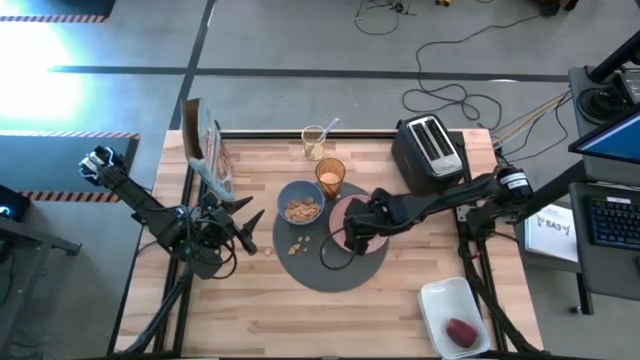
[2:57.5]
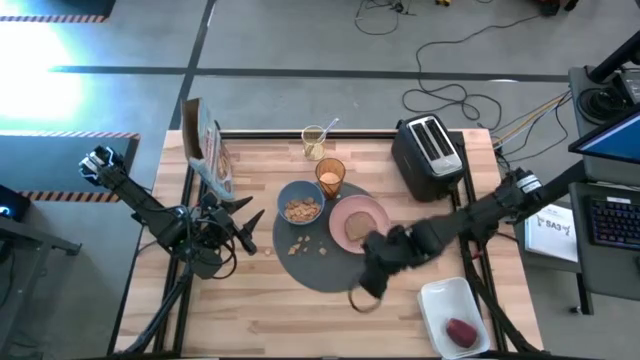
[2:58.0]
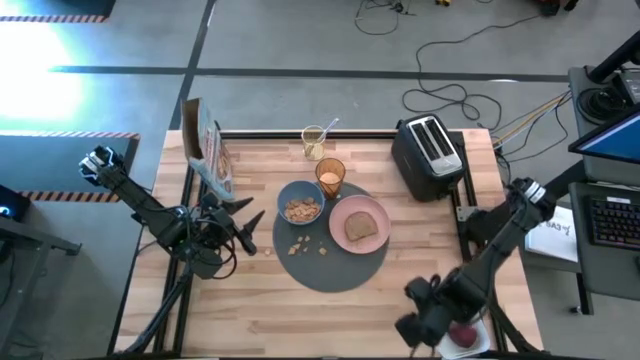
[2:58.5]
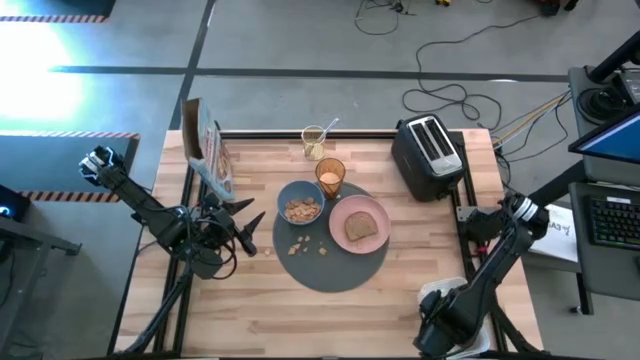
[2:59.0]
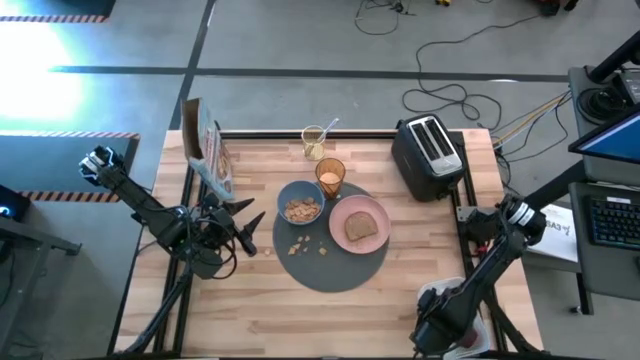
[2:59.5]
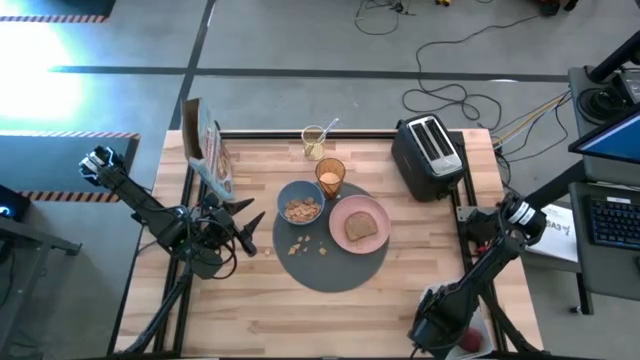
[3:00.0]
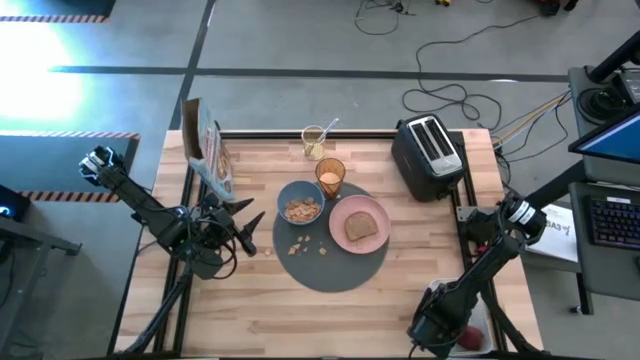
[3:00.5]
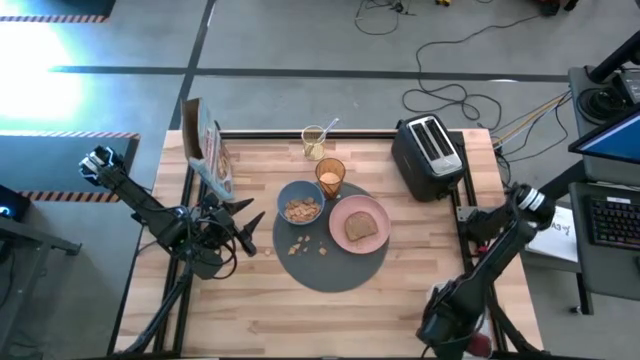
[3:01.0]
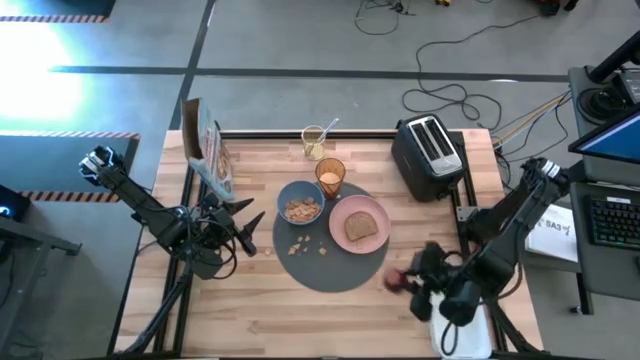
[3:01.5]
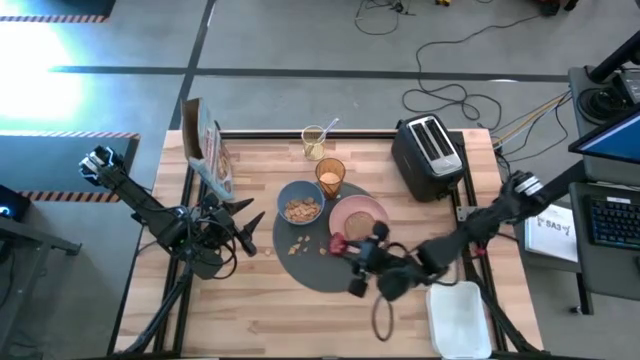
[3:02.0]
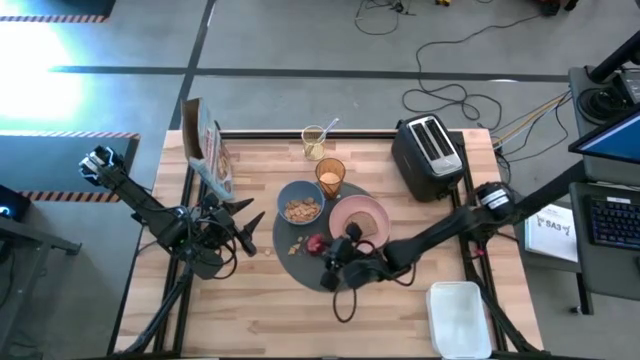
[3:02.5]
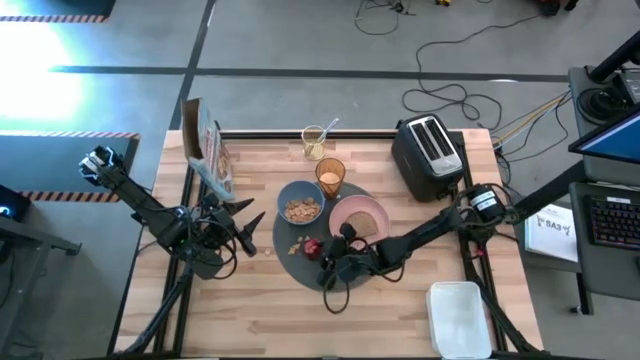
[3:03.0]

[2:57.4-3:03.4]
Task: Arrange a breakfast setting
Put the red apple to the bottom of the blue bowl and plate on the grey table placemat

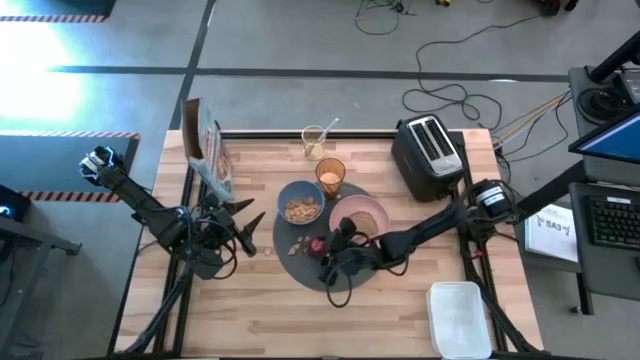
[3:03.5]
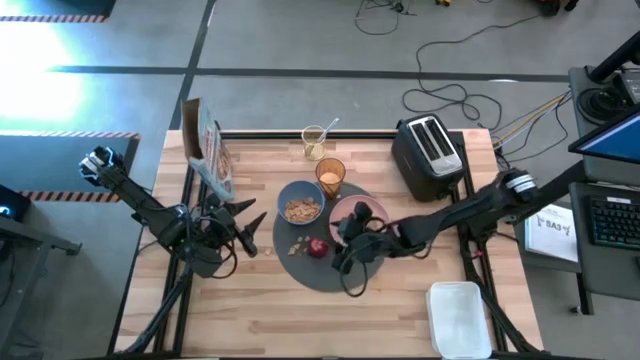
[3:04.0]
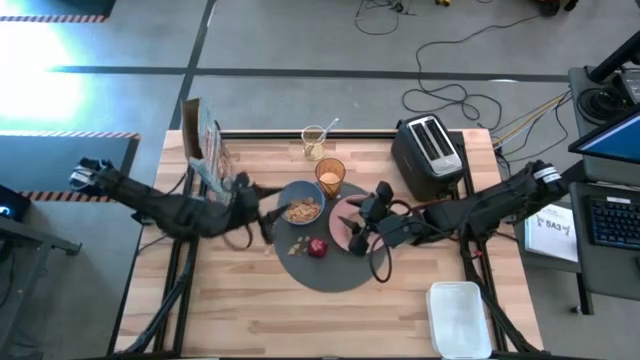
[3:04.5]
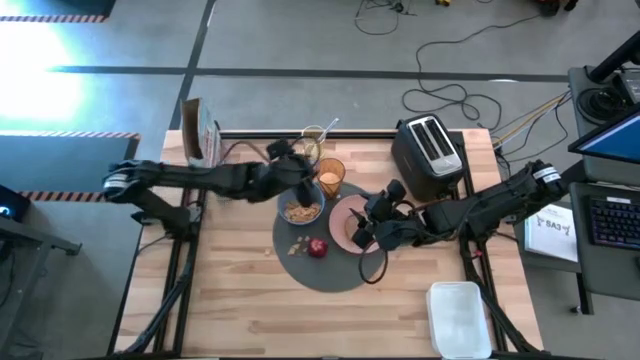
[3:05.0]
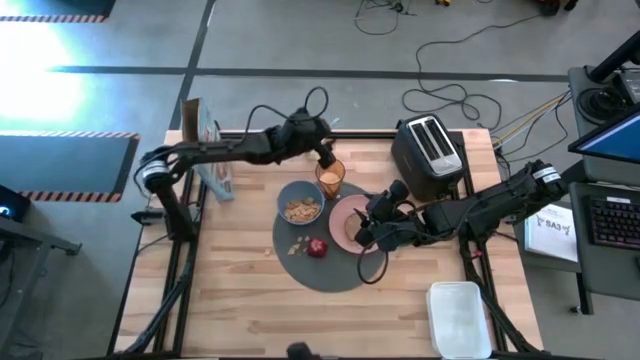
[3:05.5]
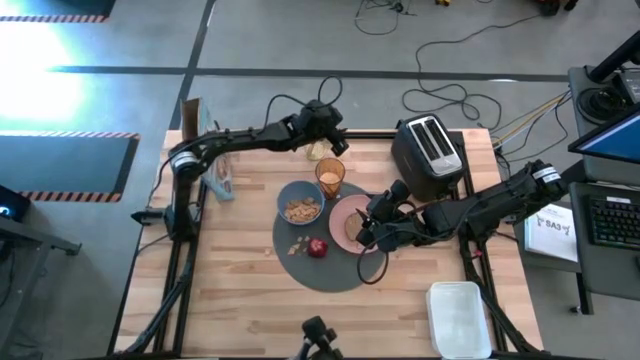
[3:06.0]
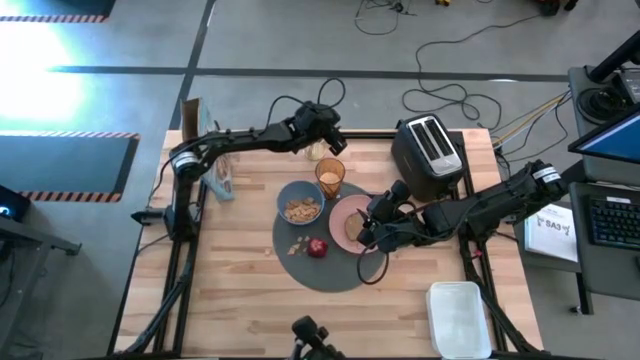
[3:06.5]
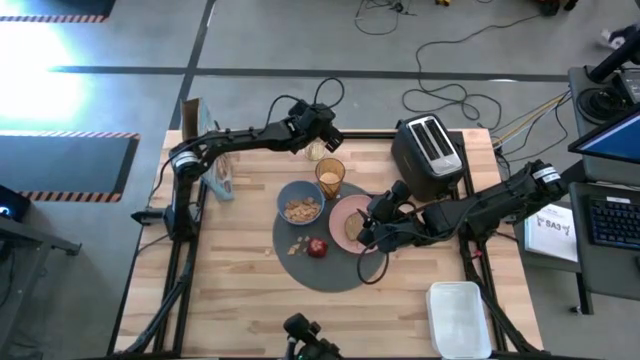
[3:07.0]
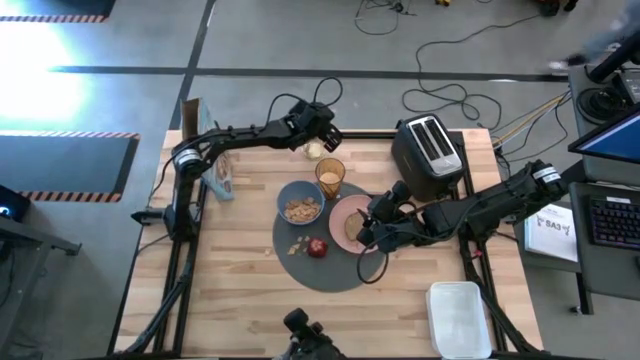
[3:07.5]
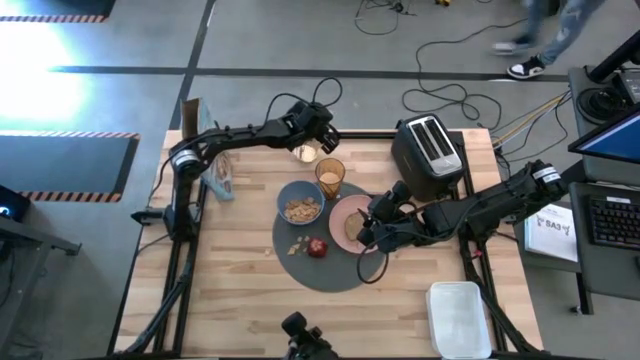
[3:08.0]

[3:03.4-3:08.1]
Put the blue spoon to the left the blue bowl on the gray table placemat

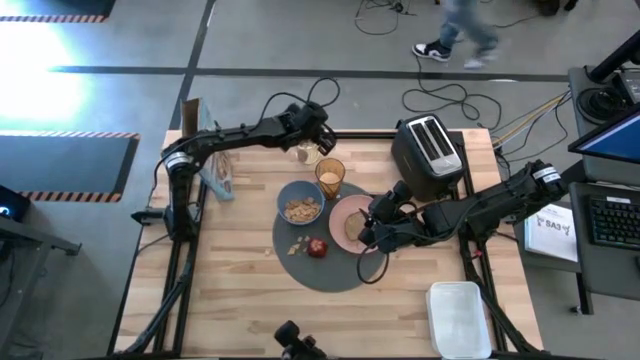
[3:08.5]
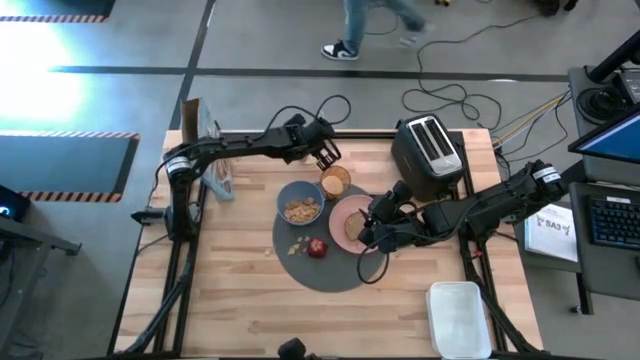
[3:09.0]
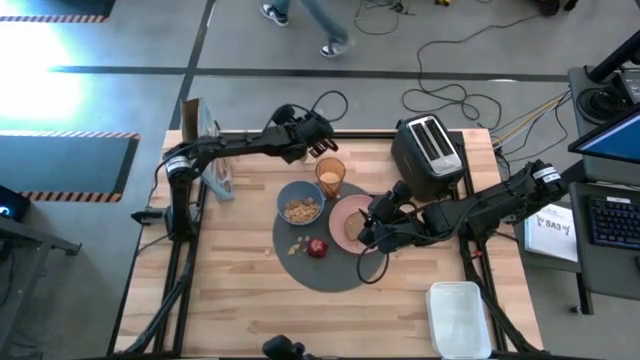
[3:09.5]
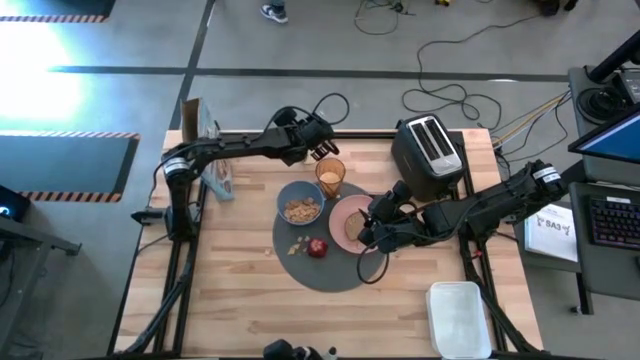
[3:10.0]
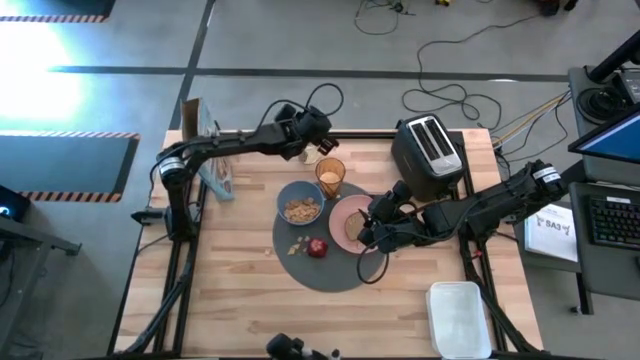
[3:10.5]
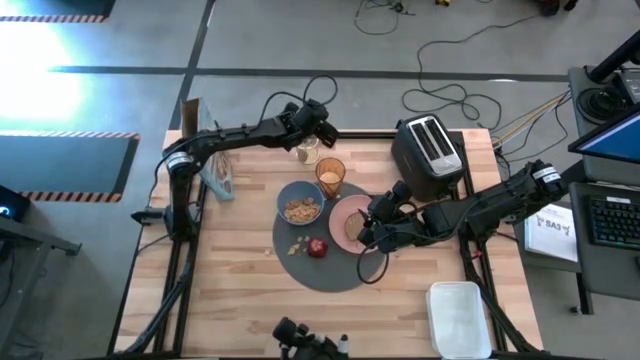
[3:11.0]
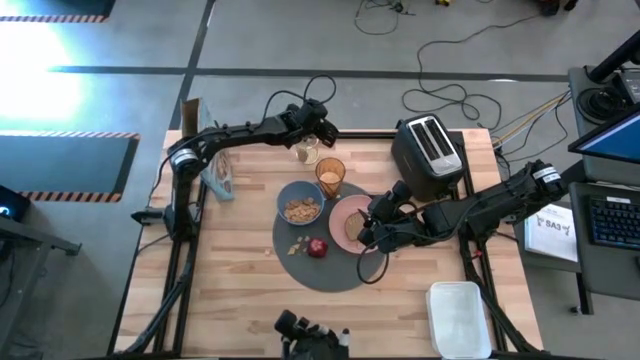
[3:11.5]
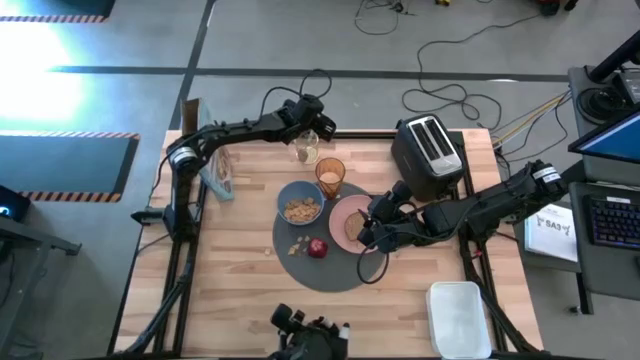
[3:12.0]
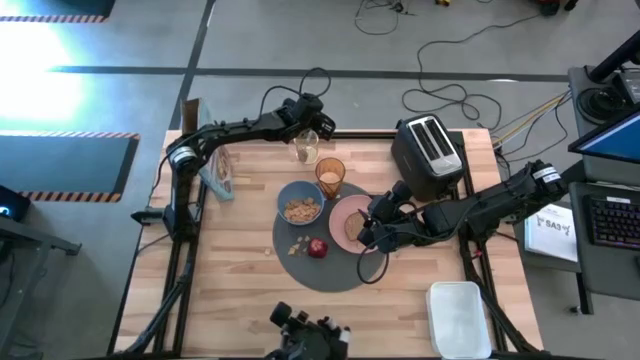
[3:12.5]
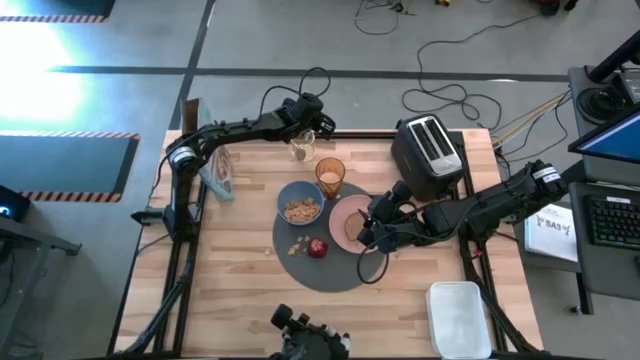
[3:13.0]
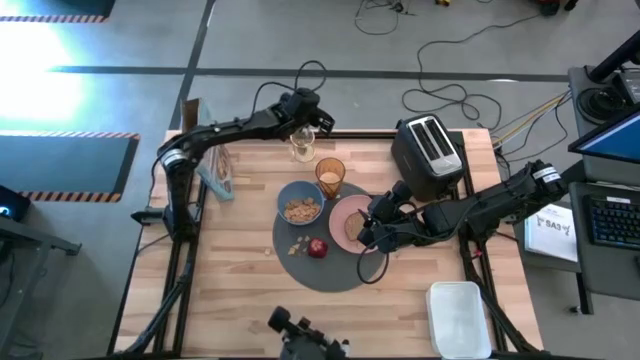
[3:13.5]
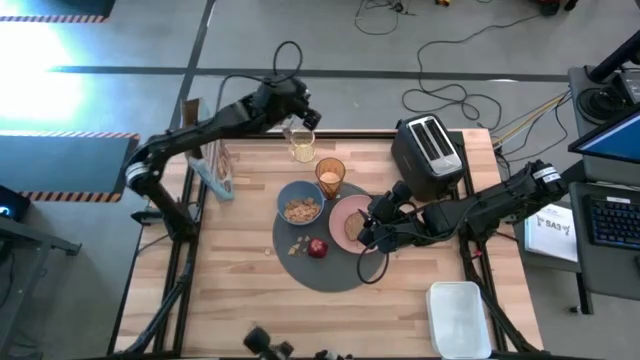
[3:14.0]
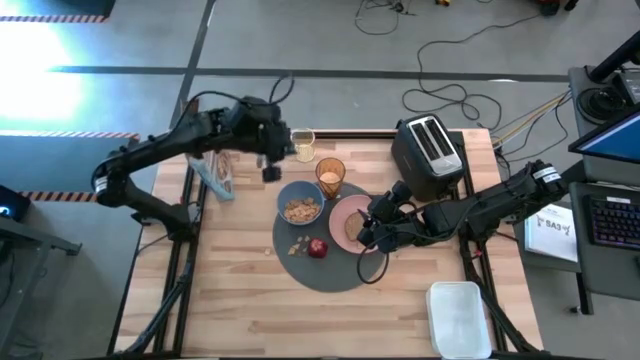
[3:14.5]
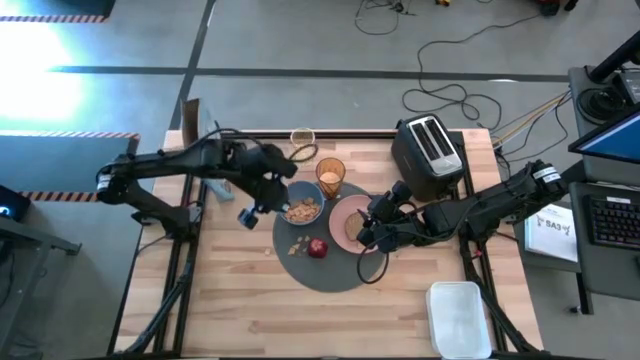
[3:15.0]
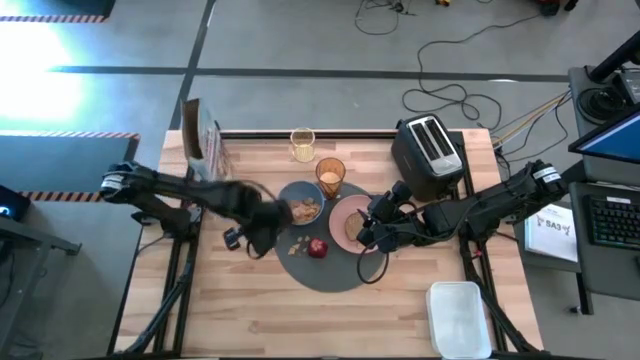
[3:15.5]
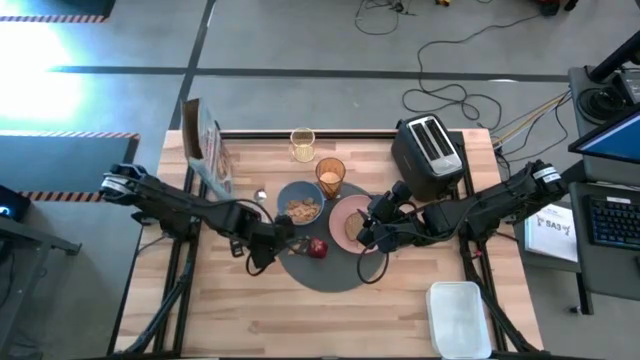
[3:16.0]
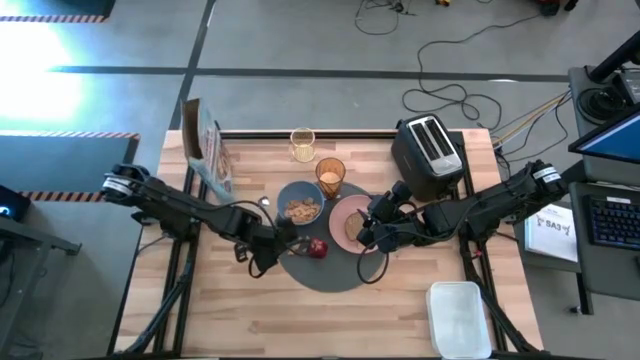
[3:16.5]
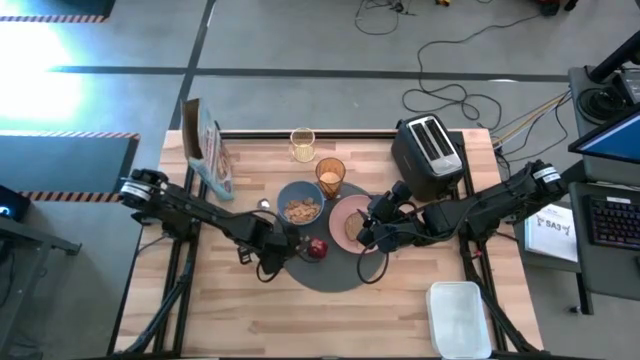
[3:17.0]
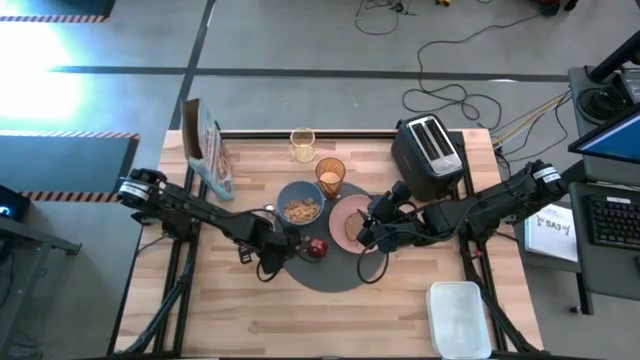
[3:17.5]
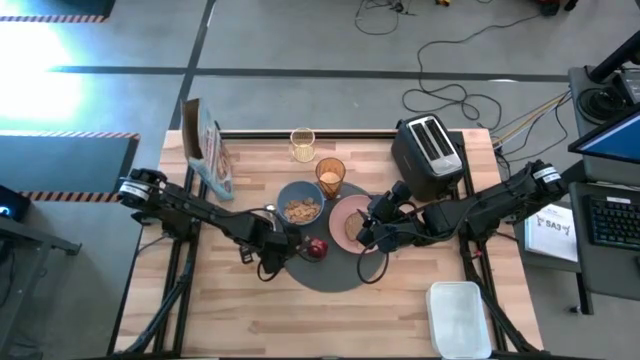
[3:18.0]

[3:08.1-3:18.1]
Put the blue spoon to the left the blue bowl on the gray table placemat
